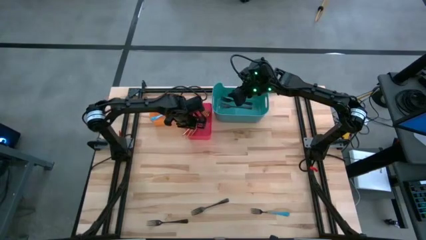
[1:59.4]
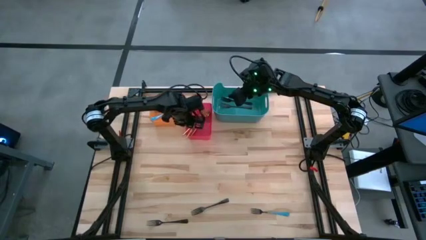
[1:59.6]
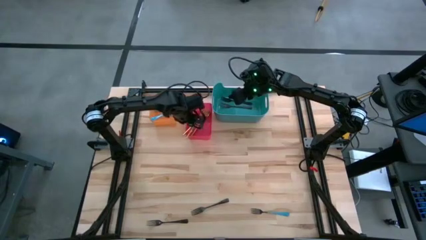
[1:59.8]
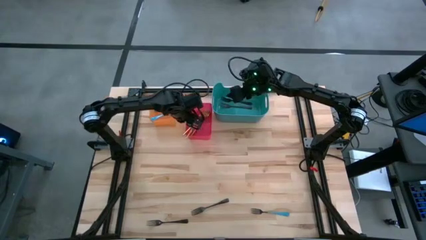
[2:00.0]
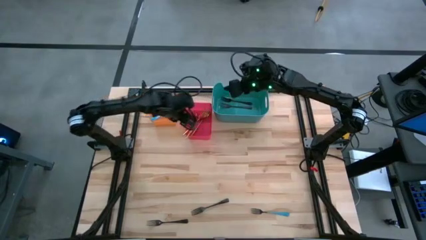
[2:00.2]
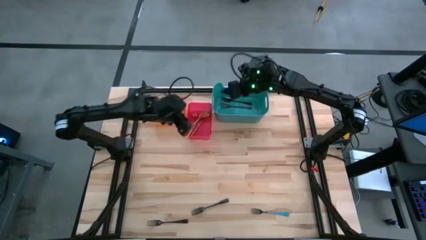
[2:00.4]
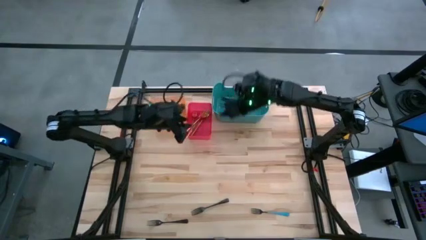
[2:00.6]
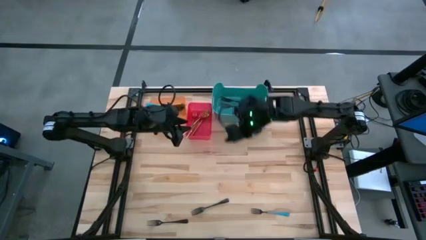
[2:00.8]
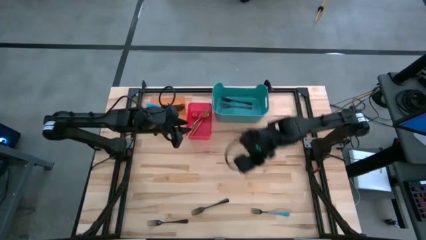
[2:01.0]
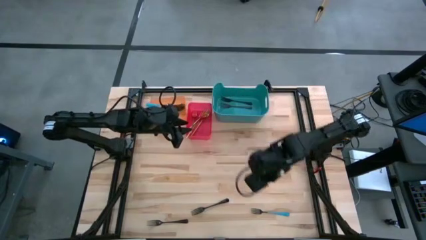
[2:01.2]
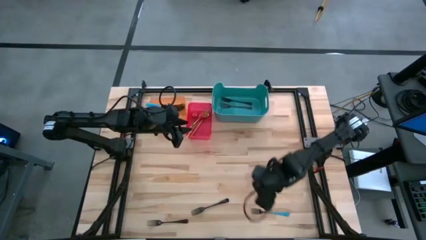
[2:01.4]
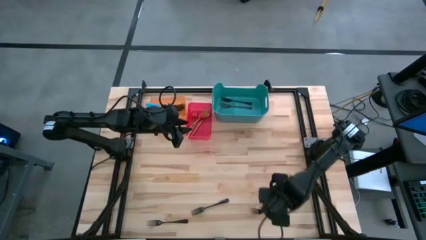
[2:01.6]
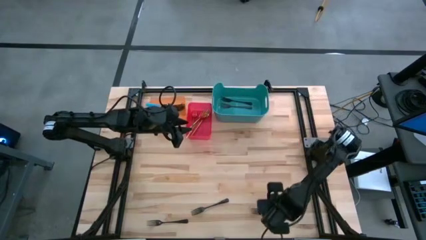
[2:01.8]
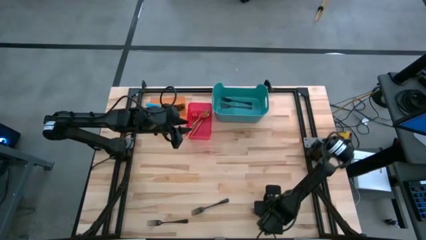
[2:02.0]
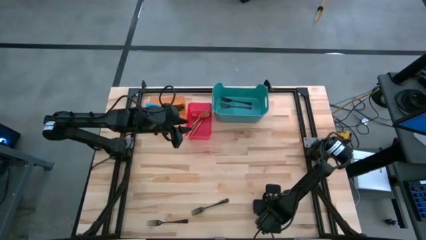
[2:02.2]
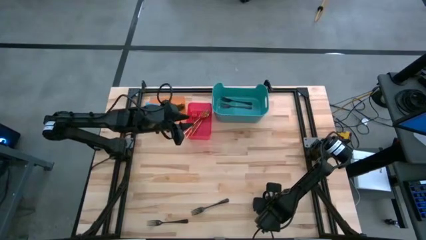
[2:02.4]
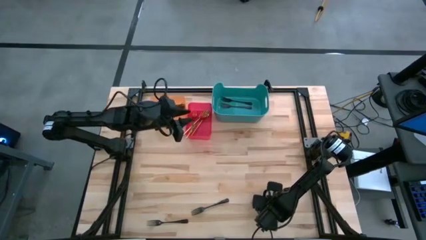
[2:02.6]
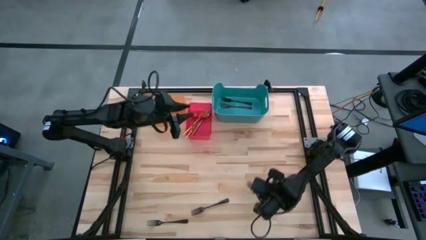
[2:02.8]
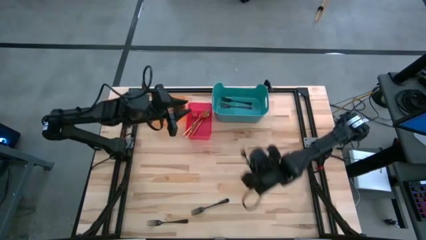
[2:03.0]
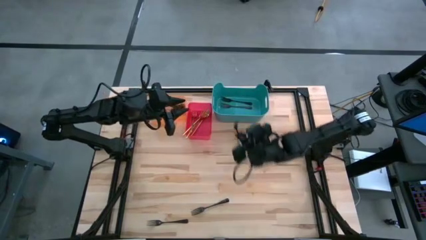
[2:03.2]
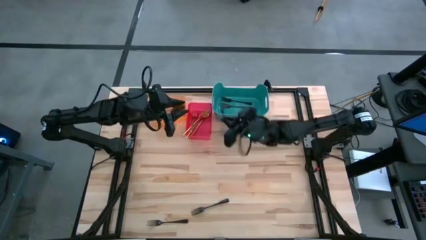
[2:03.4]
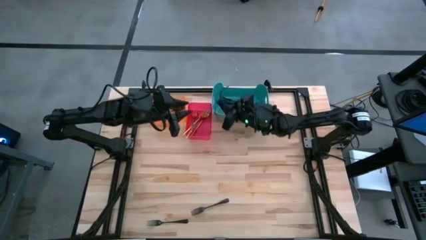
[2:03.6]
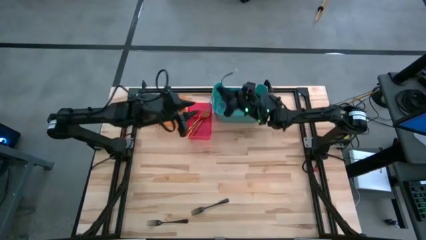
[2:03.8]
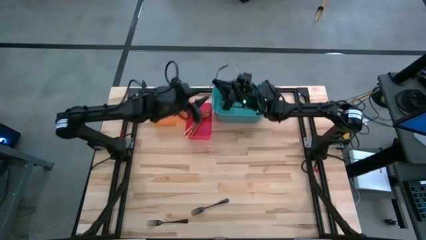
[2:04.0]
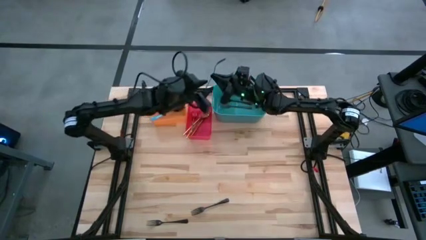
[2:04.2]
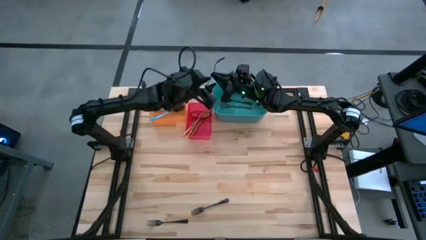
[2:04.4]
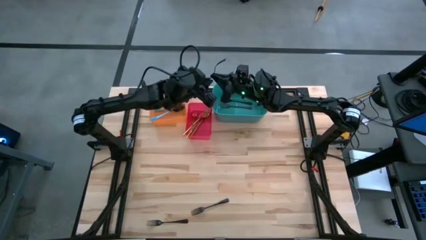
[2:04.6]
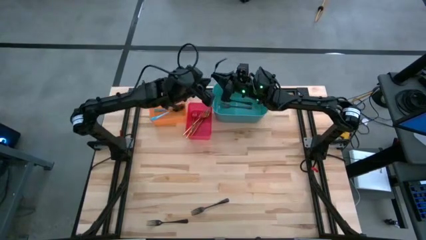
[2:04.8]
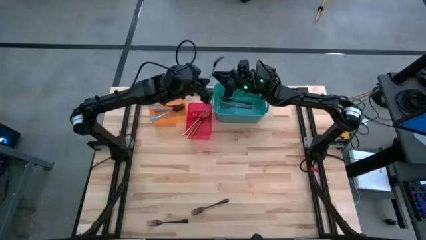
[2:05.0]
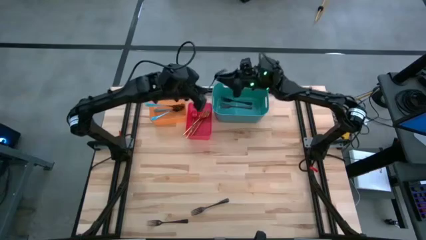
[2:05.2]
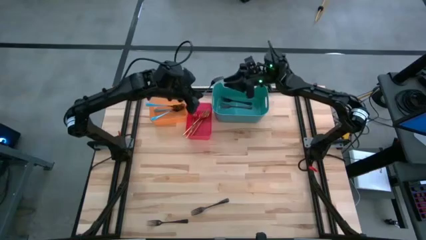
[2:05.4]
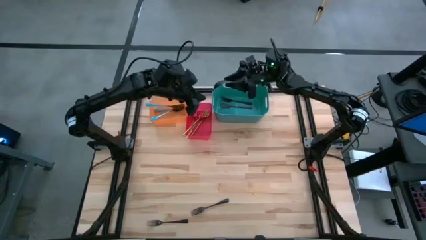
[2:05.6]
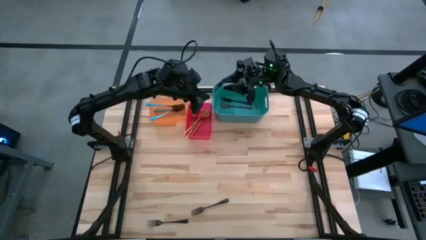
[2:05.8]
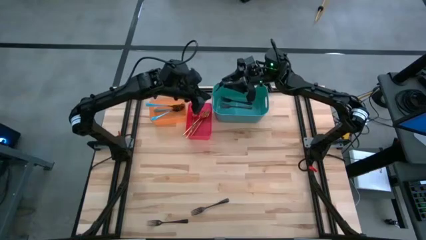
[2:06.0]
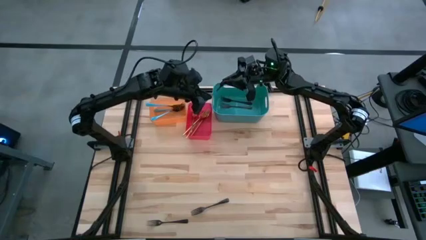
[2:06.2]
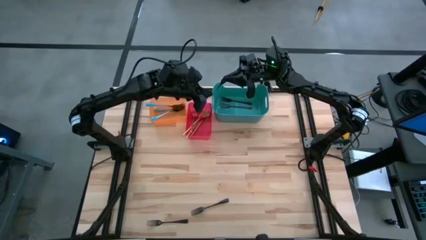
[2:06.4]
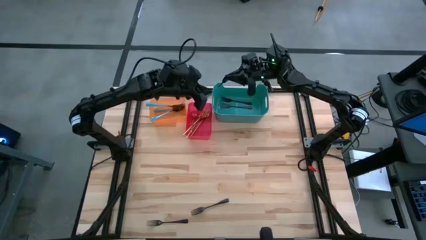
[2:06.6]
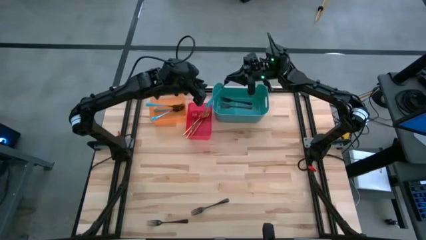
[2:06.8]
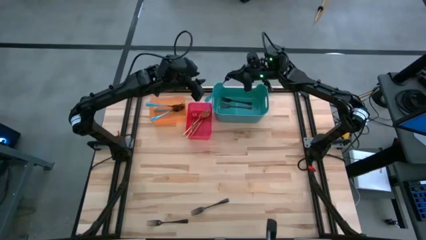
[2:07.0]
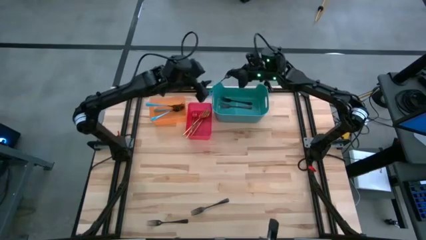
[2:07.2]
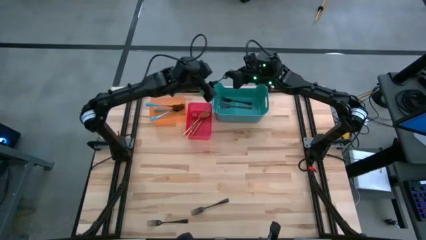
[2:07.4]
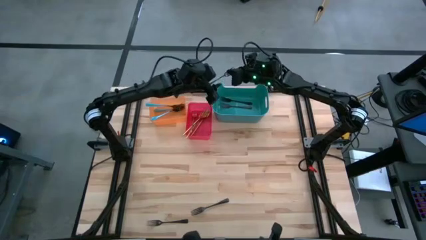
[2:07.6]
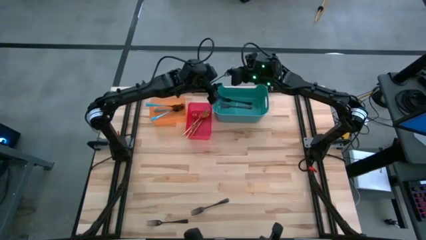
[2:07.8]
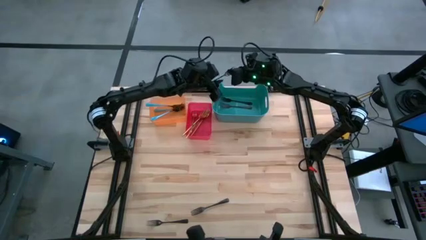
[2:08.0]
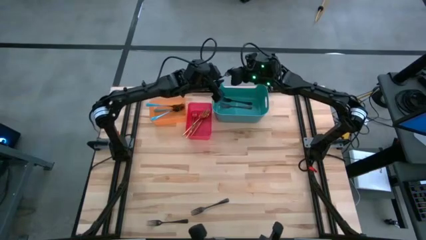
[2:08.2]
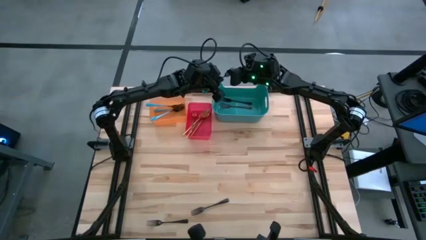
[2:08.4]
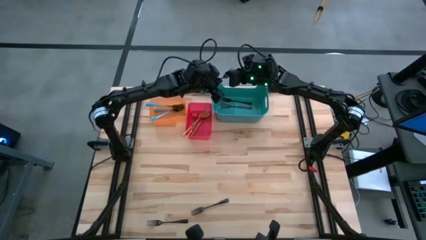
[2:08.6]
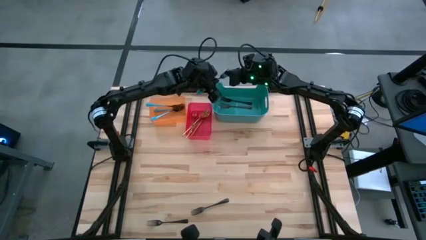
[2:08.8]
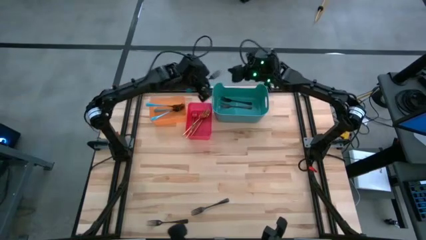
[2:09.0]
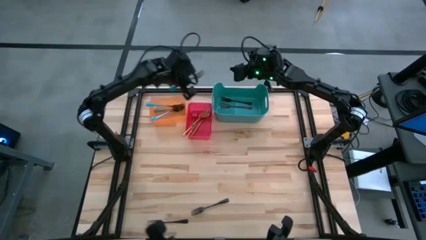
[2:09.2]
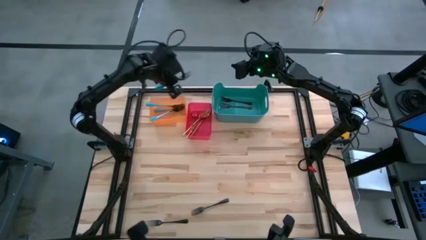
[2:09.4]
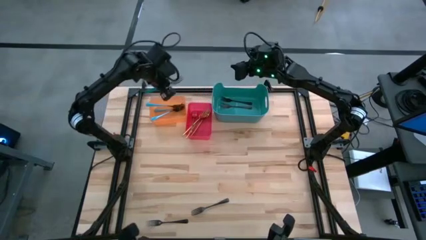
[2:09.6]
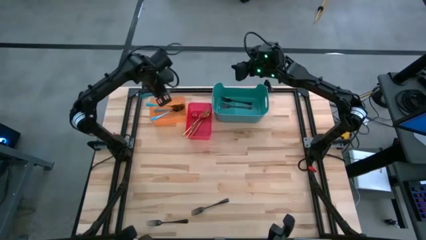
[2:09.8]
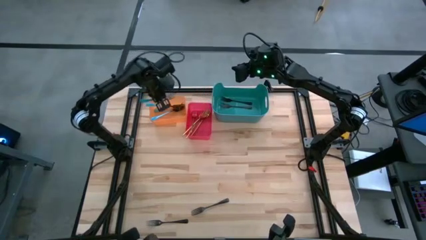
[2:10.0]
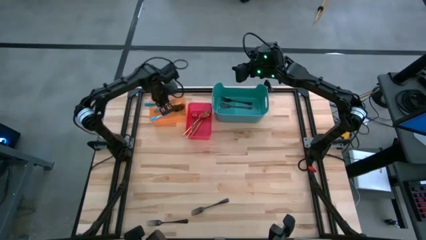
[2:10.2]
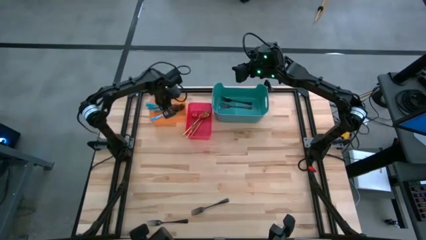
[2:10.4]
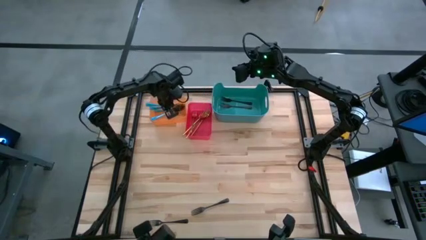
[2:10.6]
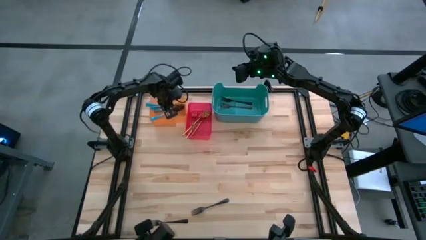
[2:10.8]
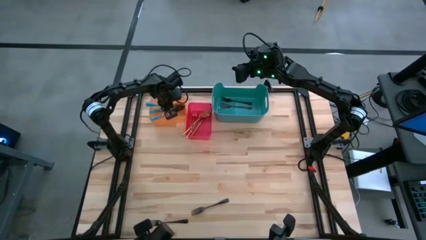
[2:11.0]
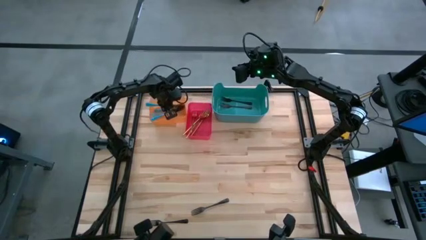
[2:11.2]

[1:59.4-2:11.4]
Task: Sort silverware by color (type)
Put the blue fork into the orange bin

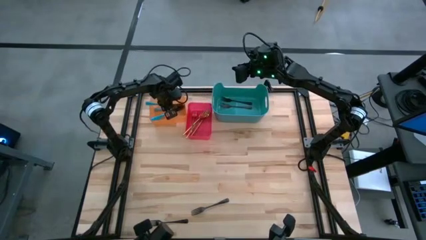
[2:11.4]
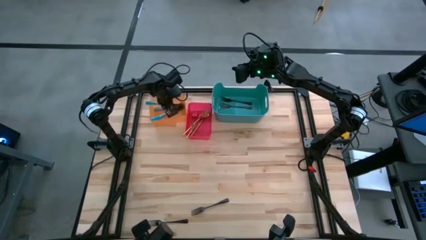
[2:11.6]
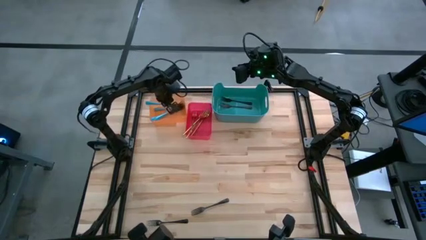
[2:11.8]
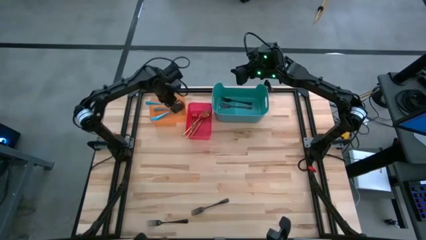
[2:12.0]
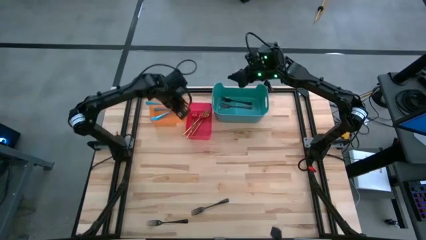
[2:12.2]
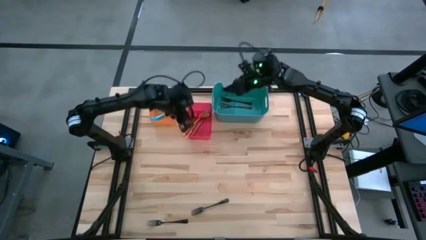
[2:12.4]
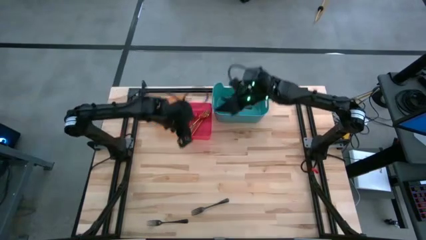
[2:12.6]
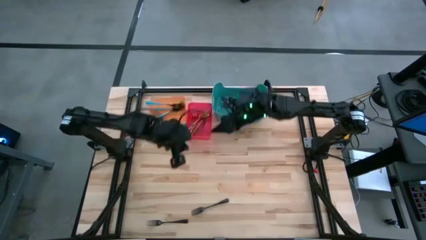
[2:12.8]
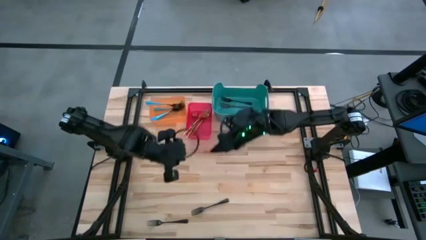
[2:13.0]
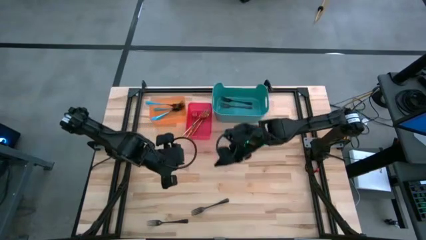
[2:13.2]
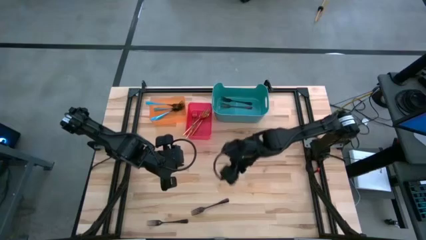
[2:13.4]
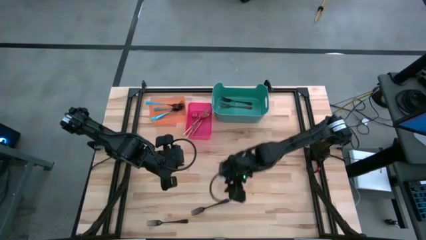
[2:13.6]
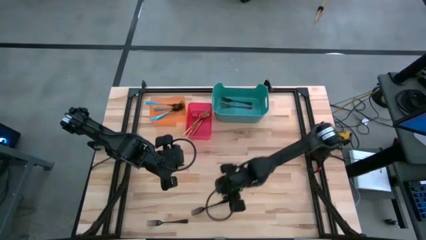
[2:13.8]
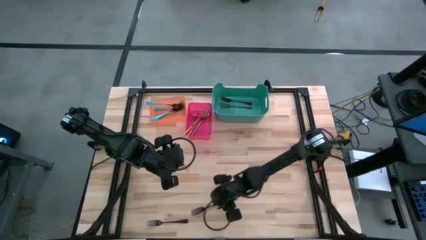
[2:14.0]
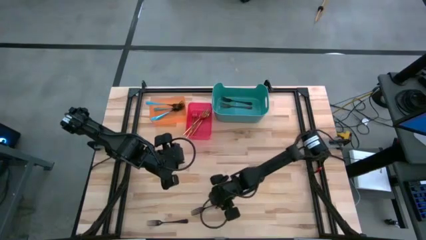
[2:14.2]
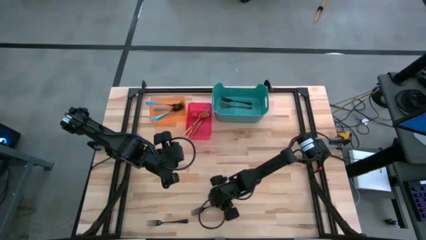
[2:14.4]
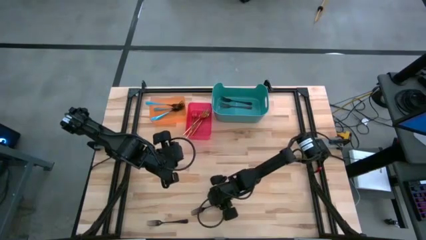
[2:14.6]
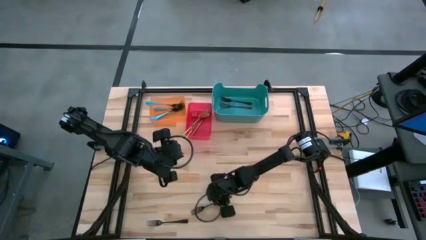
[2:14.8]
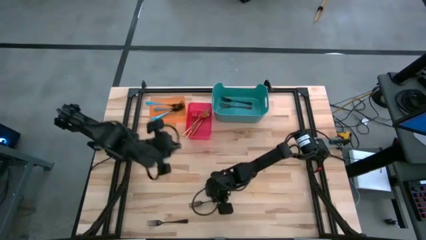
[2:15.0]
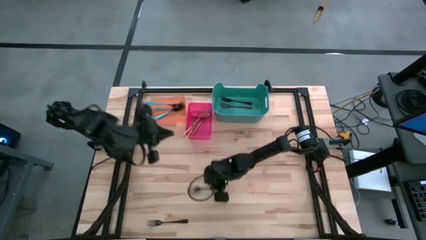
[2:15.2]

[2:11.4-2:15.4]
Put the black fork into the green bin
